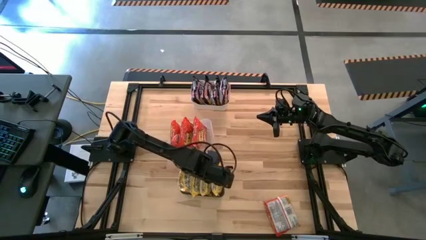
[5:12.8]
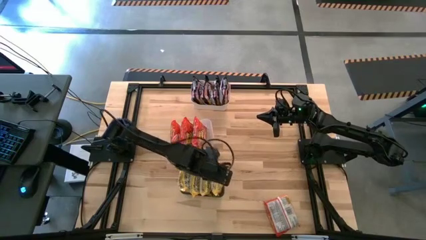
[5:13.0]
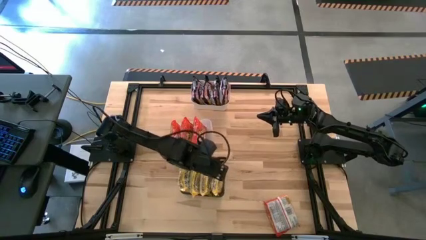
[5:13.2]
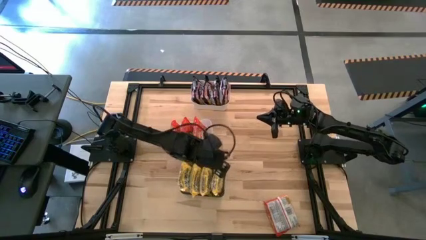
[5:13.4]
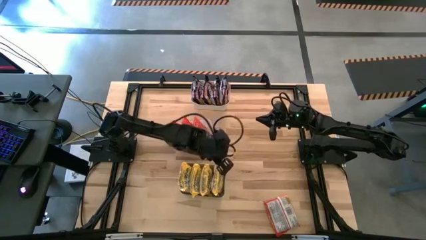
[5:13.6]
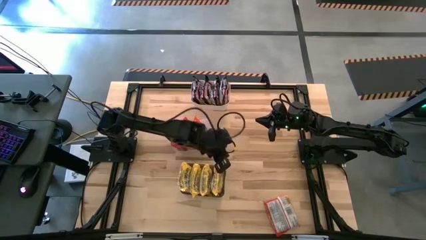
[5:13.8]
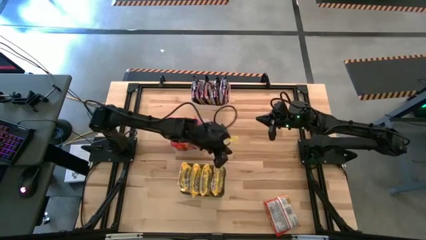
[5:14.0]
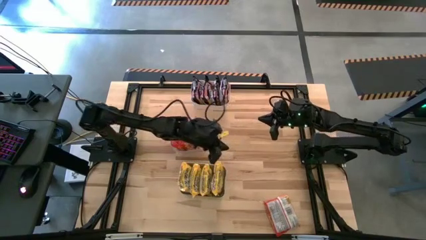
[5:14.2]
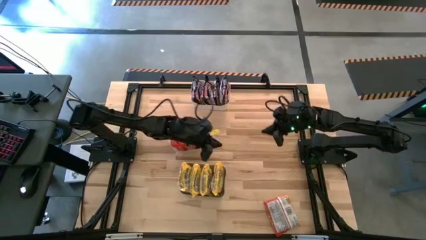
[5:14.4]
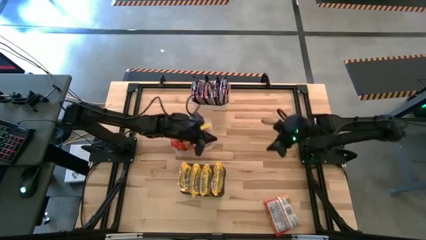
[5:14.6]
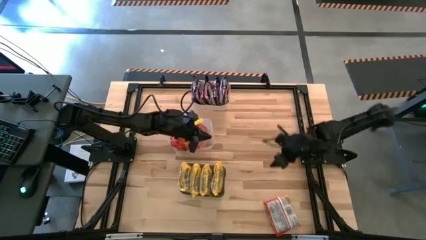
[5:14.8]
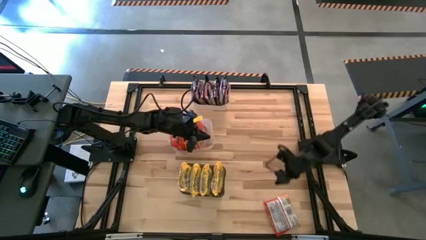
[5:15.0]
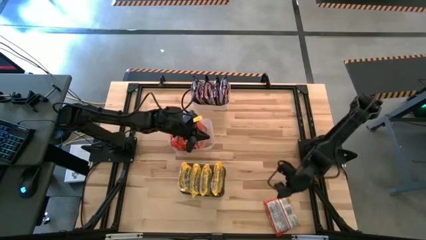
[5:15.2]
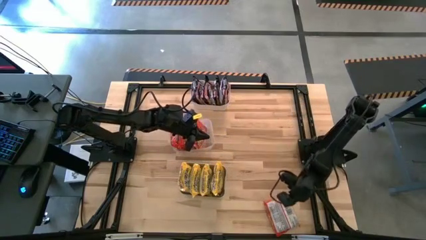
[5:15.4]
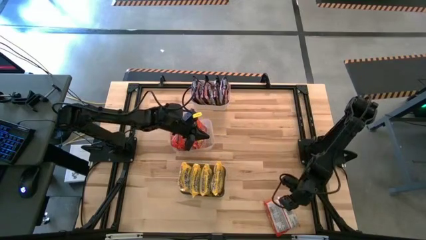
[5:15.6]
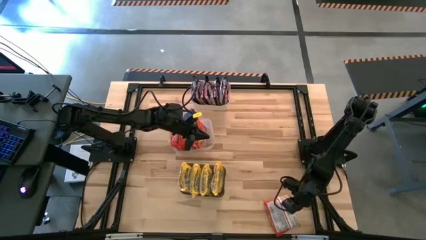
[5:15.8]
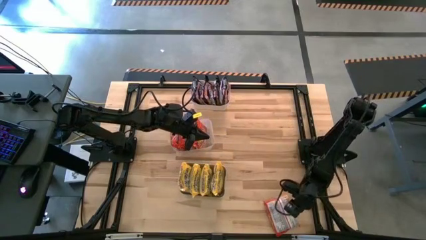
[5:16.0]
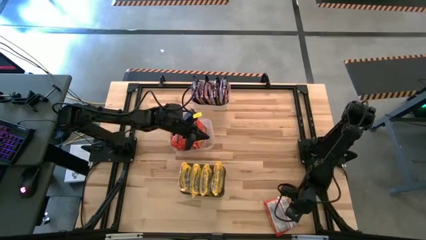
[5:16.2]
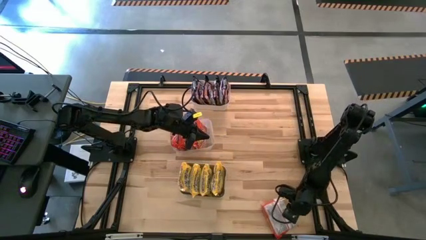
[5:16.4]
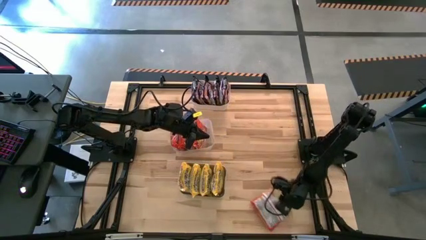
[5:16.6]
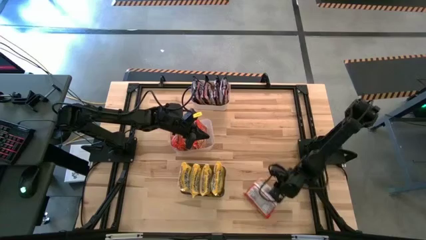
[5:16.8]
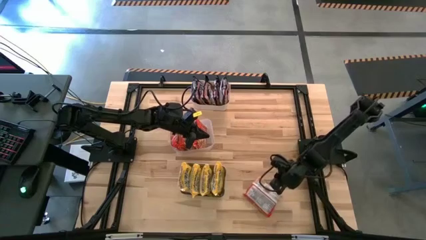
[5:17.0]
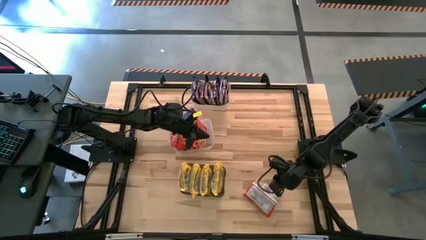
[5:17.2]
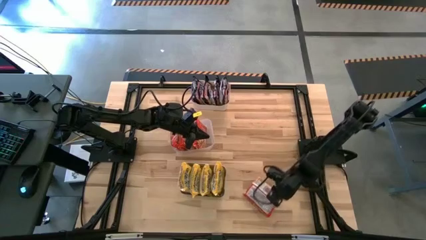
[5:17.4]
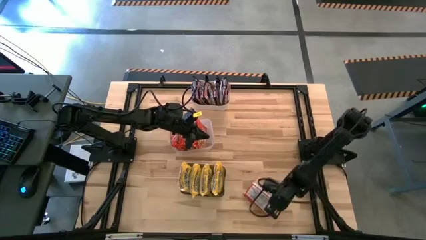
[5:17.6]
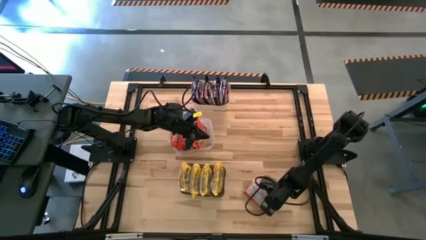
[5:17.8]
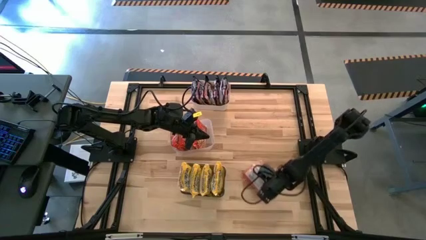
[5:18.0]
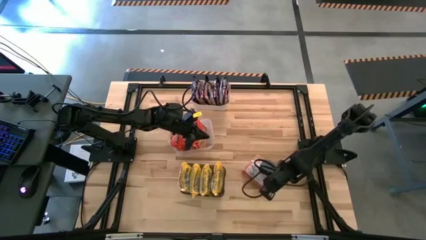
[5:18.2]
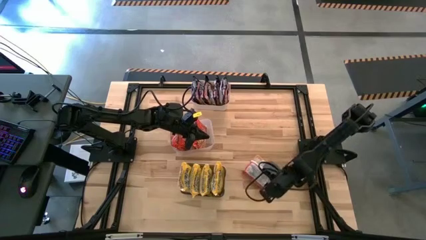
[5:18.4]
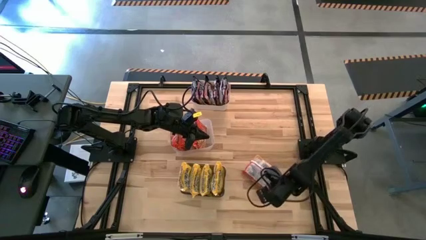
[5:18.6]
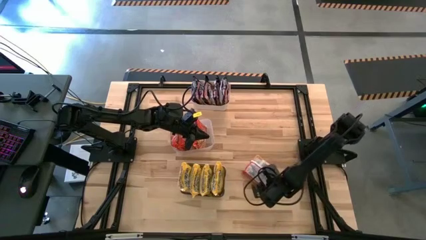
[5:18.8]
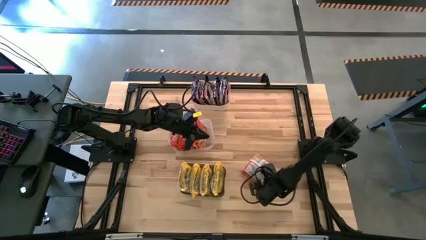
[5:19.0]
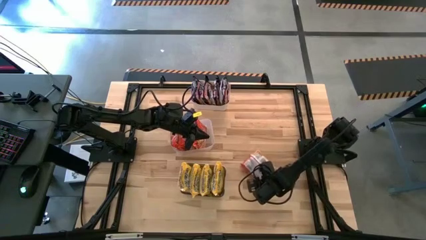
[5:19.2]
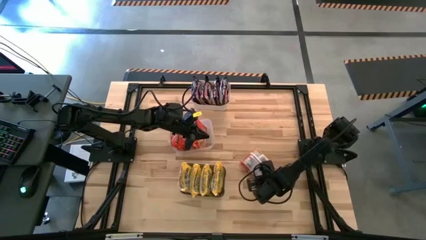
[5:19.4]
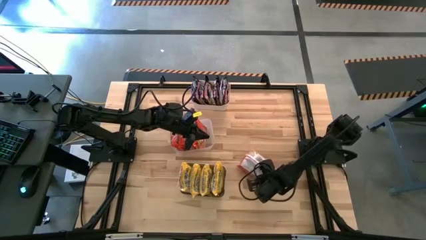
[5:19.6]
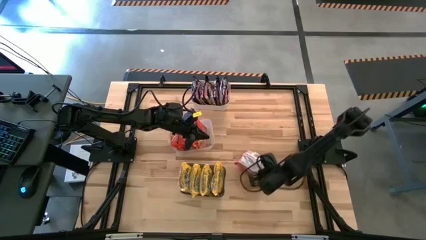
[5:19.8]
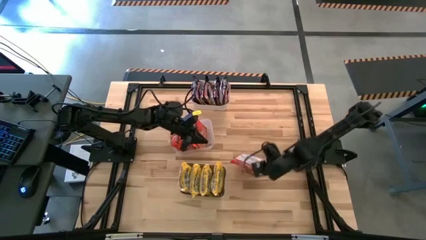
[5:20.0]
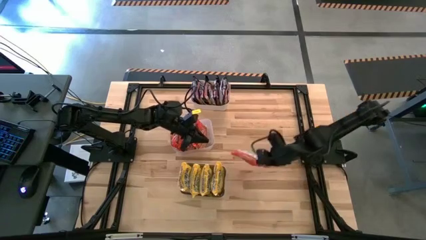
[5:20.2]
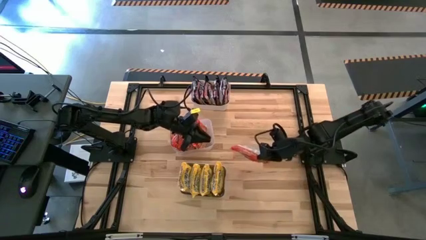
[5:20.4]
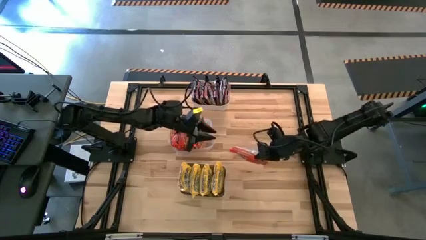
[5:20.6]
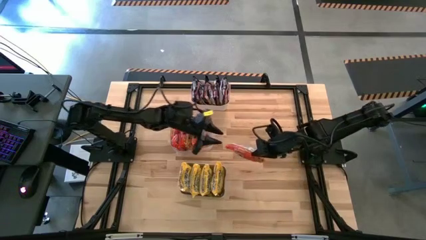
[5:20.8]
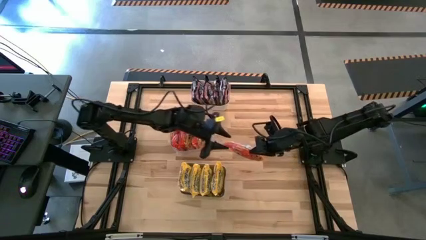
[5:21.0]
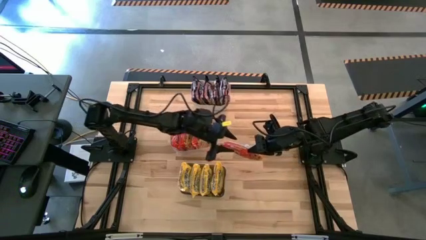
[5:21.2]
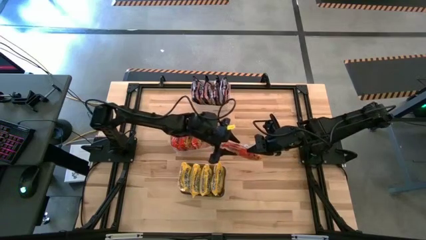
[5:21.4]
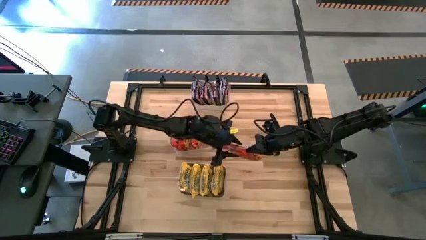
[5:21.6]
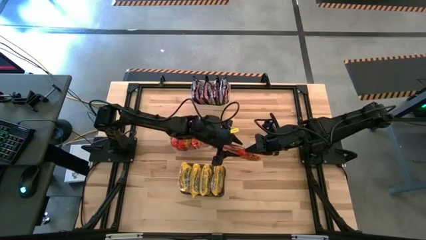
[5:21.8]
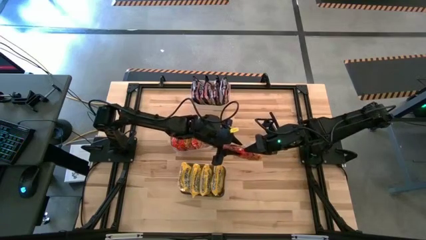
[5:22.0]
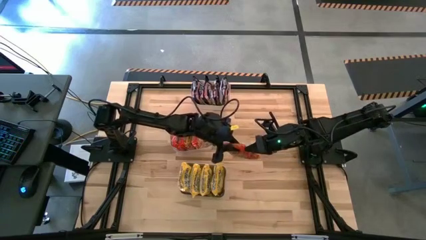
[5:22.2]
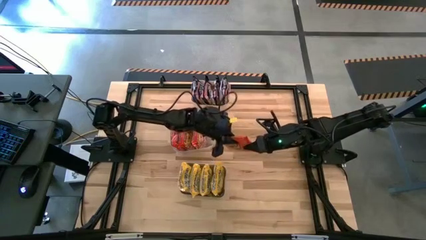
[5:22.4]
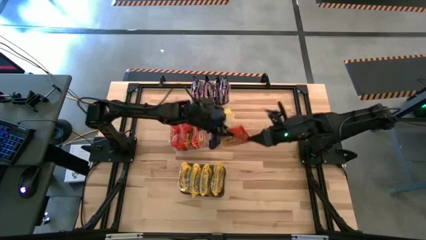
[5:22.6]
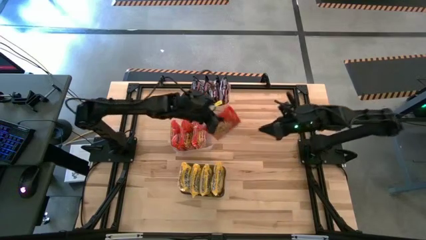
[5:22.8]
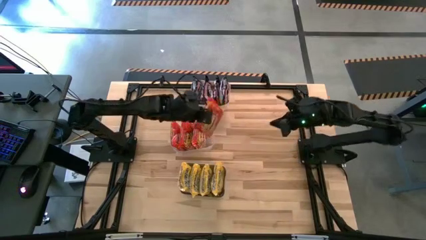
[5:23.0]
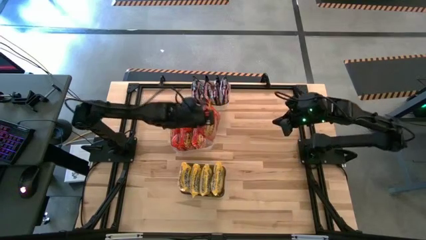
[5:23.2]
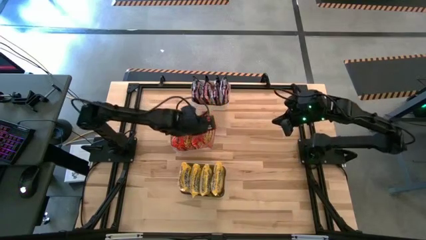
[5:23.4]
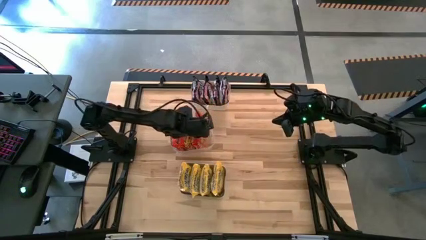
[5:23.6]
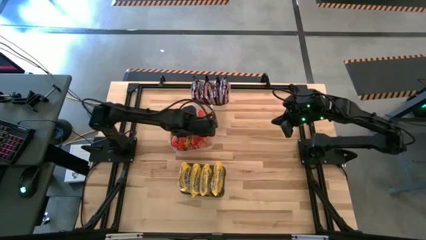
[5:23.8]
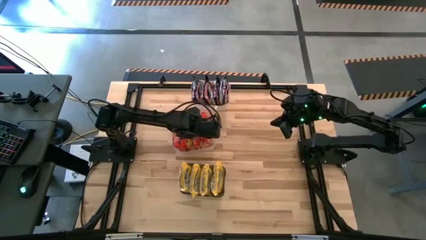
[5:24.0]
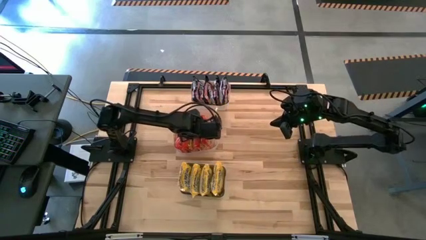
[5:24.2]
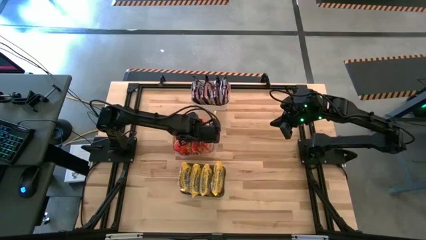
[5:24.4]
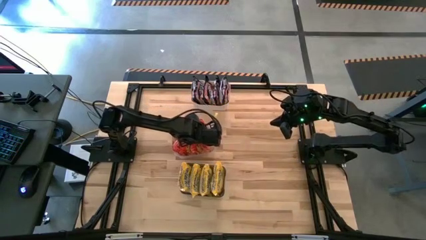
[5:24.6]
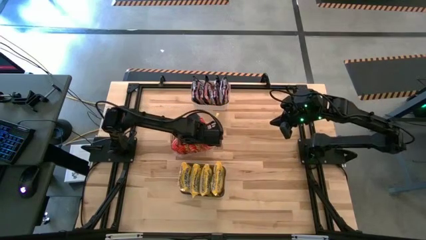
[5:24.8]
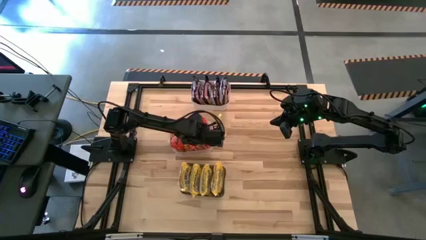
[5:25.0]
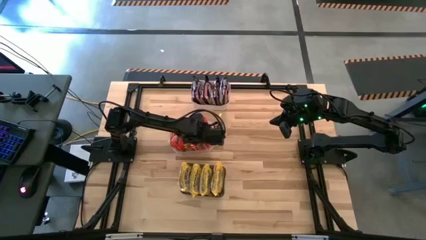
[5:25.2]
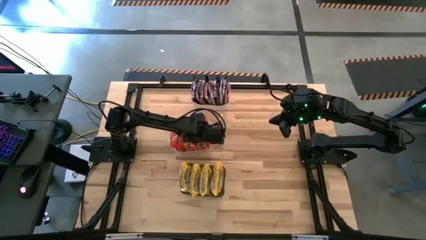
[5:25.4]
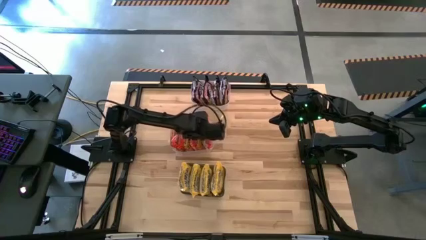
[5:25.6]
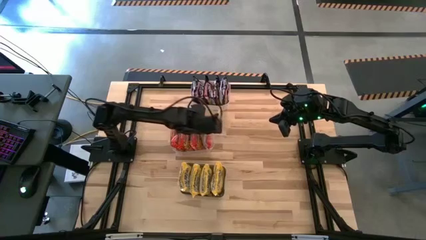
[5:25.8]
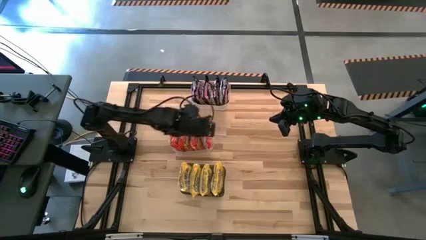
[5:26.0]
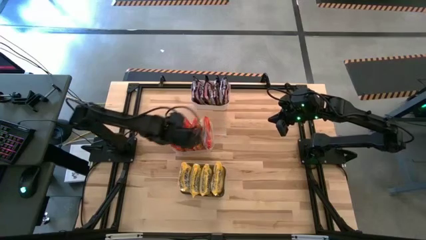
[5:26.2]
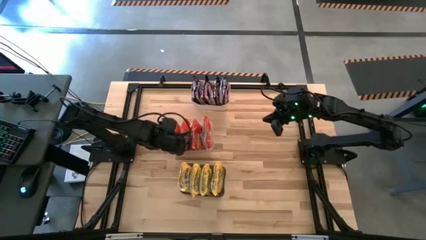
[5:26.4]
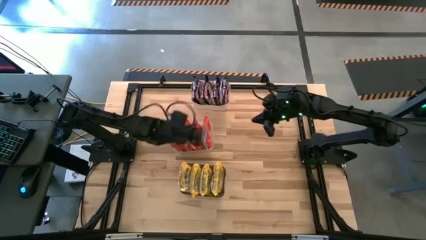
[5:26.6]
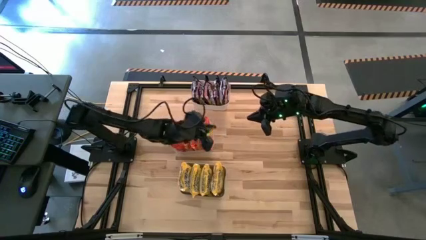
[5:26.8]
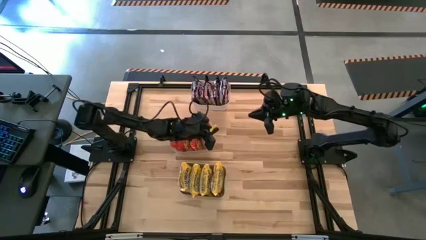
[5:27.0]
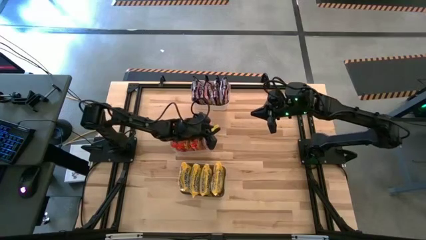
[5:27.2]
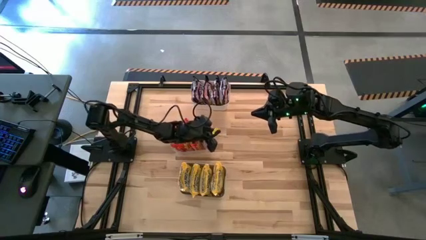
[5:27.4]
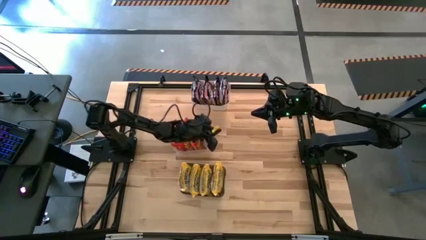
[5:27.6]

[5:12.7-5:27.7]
Task: Sort Maruchan noodles
Put the orange noodle pack into the transparent bin
